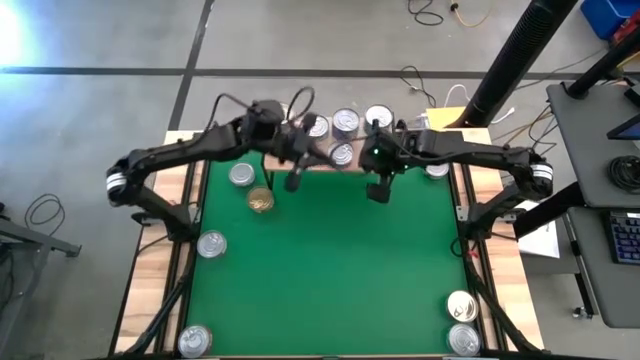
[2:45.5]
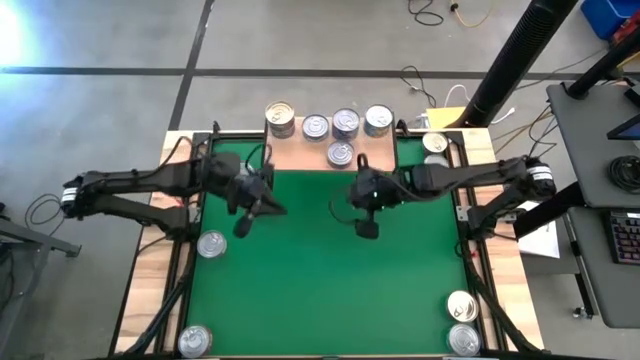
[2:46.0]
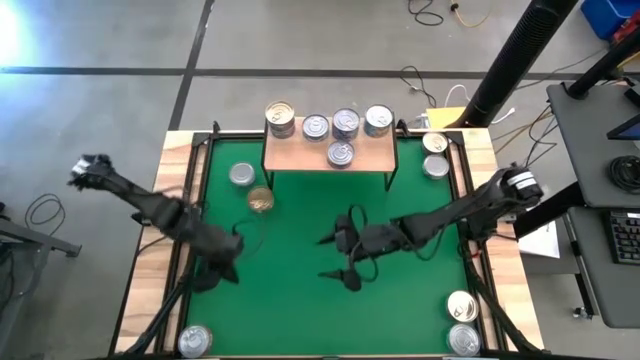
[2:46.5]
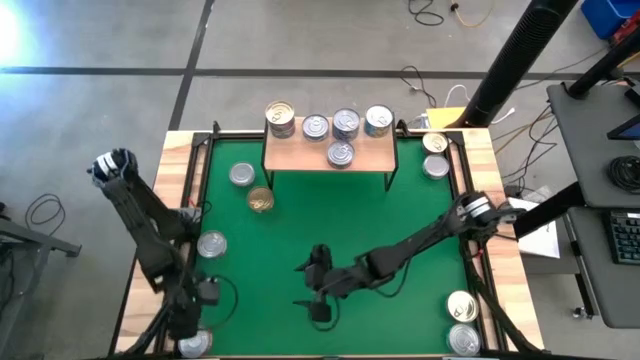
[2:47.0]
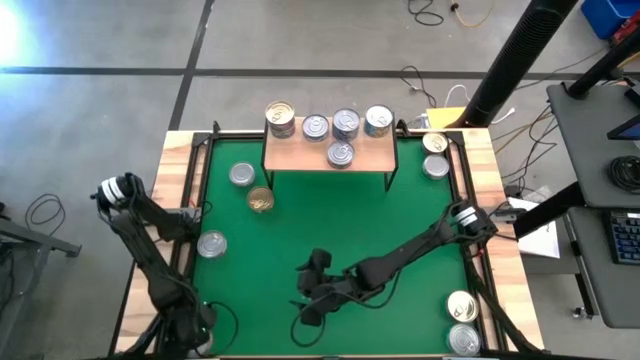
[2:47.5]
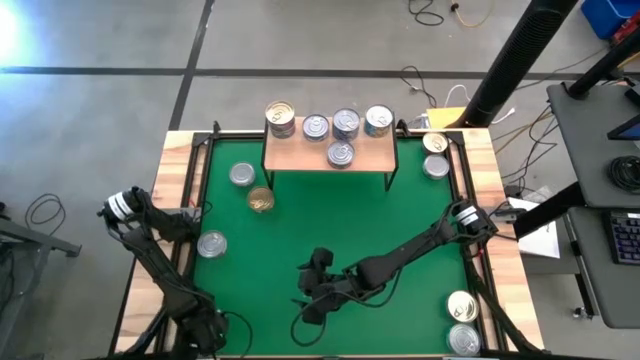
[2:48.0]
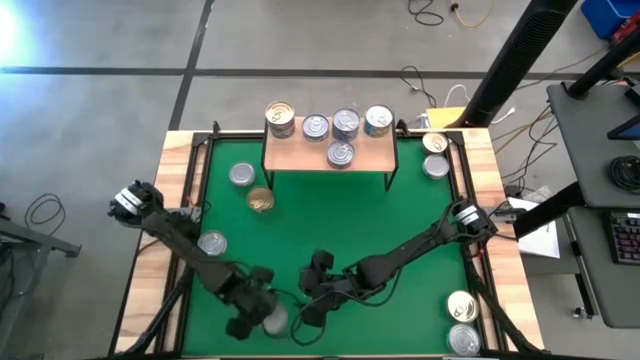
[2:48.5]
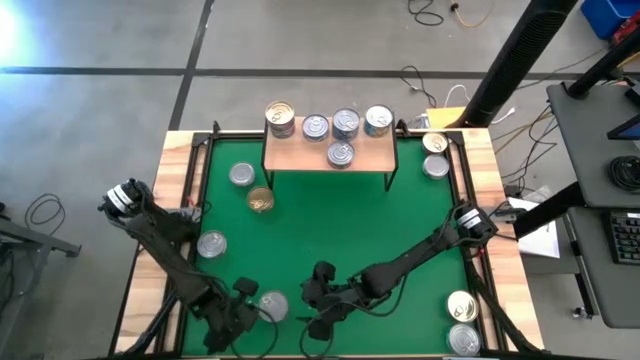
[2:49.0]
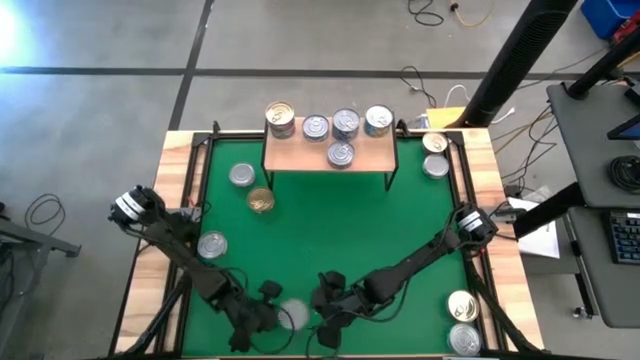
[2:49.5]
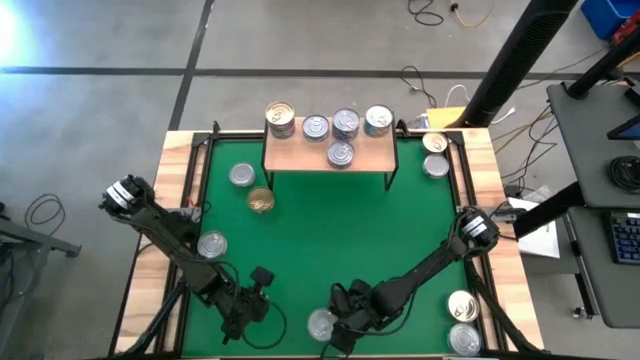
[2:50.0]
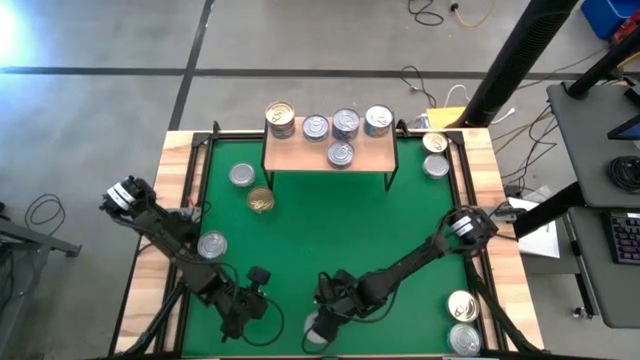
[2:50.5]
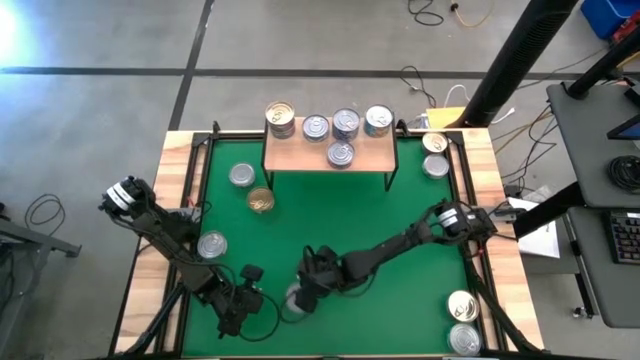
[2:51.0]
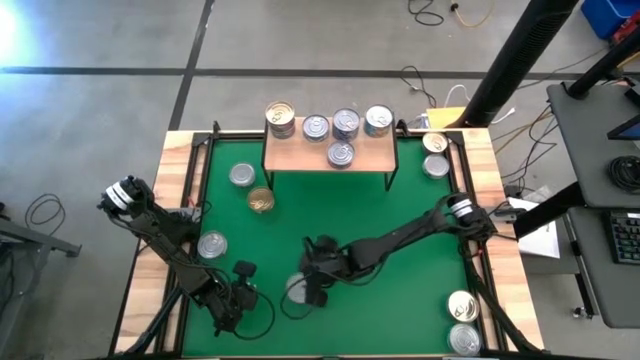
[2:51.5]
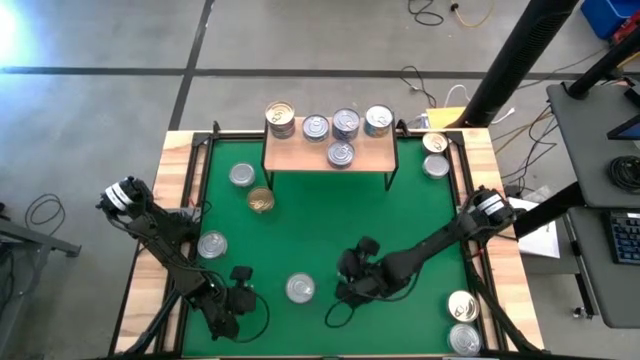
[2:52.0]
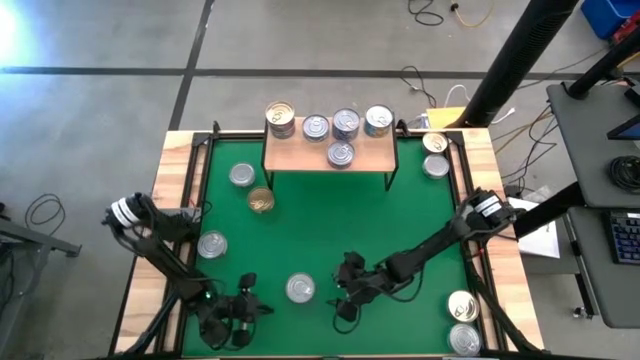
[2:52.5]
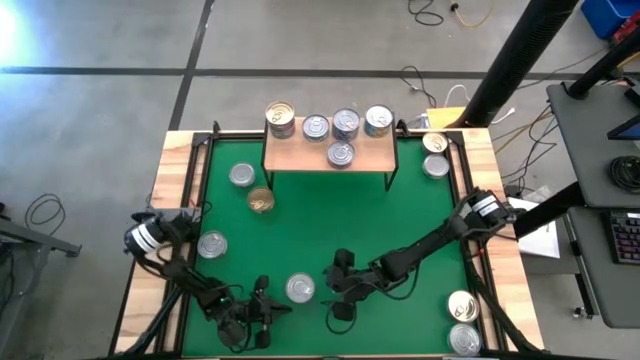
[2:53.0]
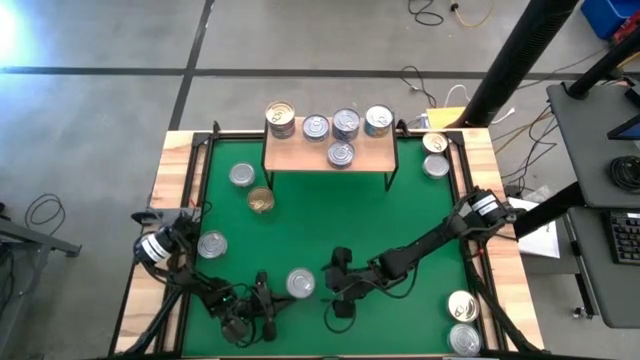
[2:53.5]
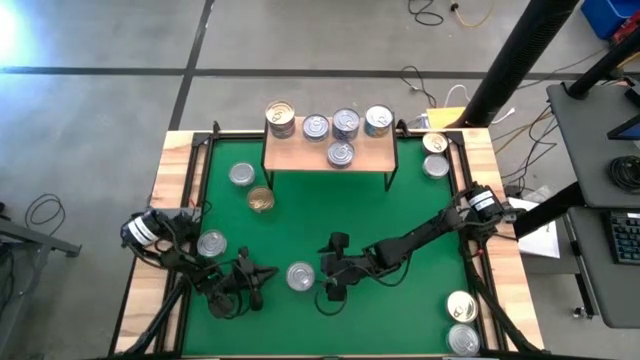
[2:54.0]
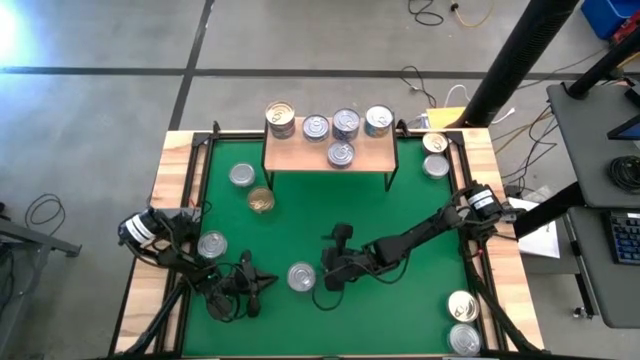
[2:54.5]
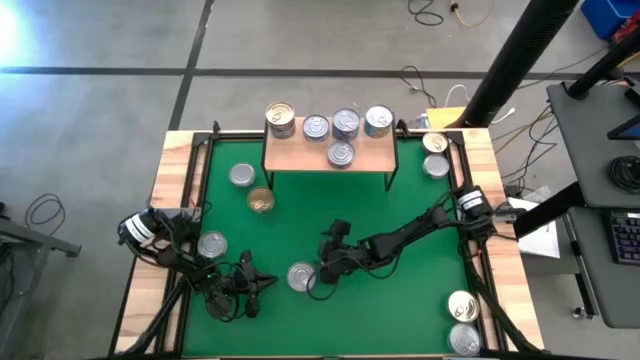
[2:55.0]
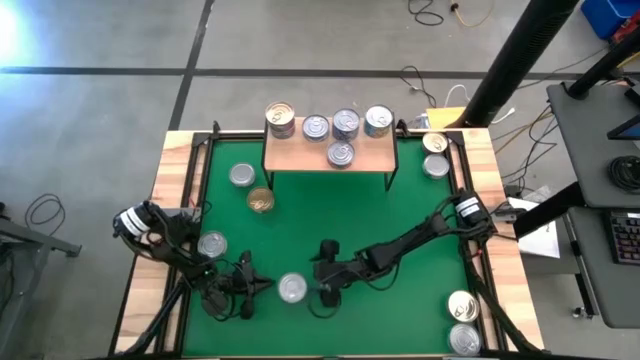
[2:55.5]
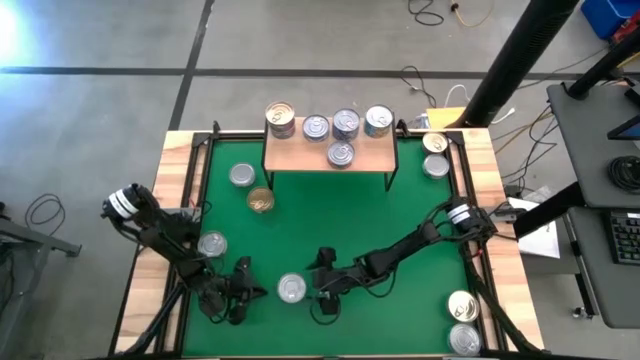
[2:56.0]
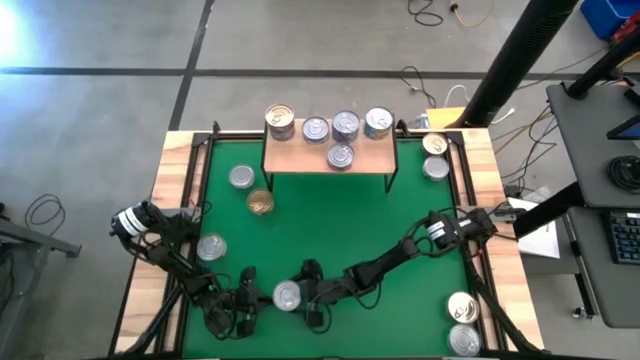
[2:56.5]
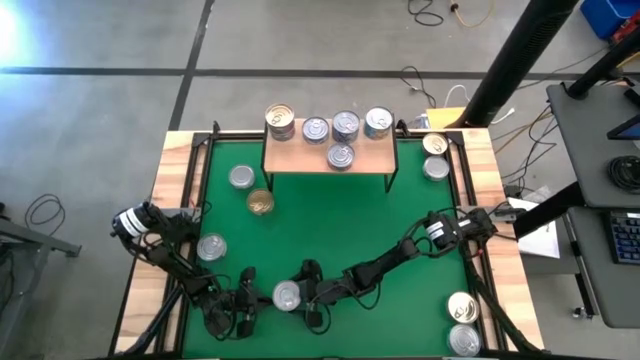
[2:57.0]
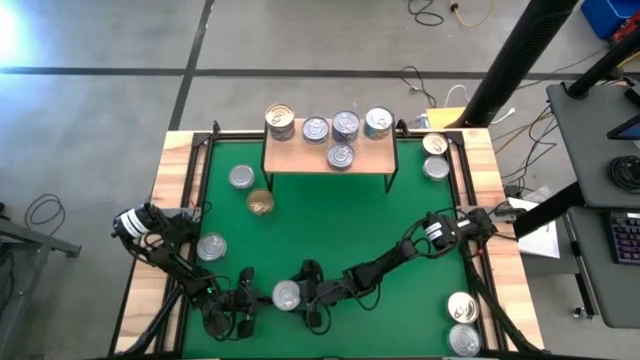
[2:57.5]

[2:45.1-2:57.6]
Task: Stack canned seafood by type on shelf
Stack the red tuna can on top of the red tuna can on the shelf

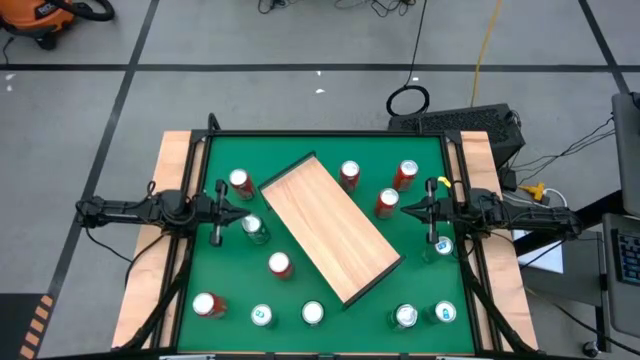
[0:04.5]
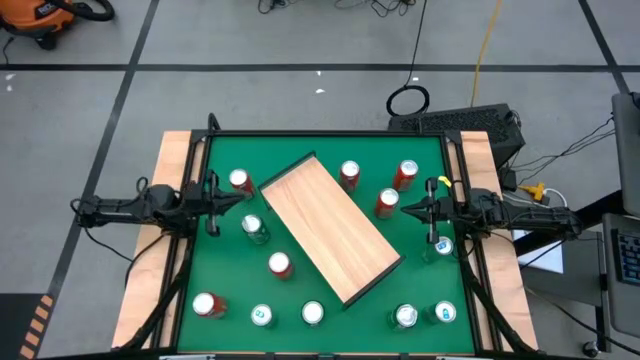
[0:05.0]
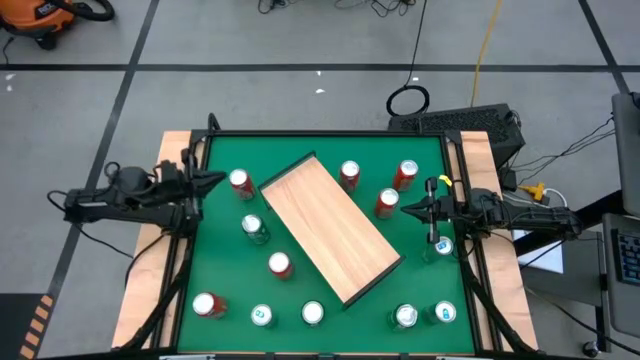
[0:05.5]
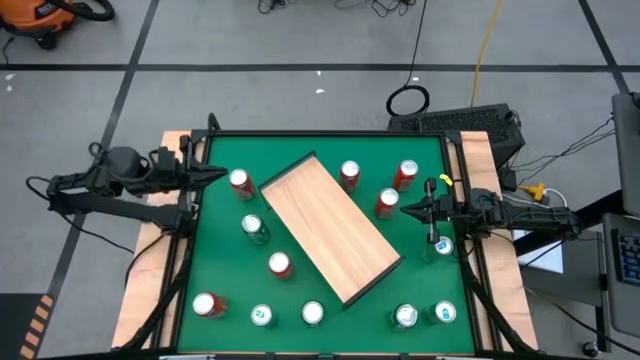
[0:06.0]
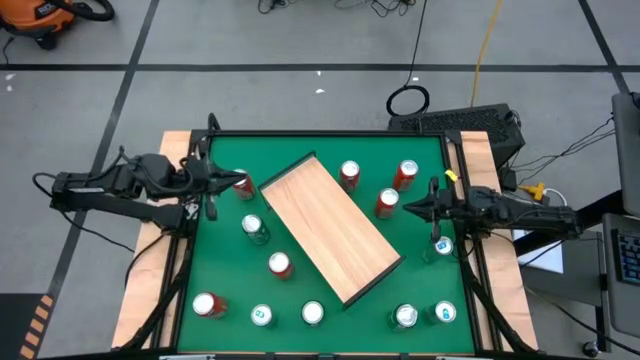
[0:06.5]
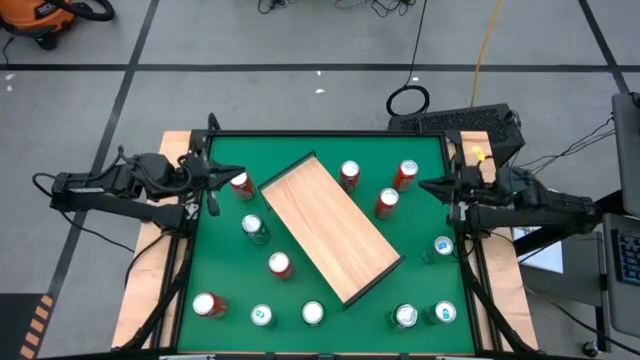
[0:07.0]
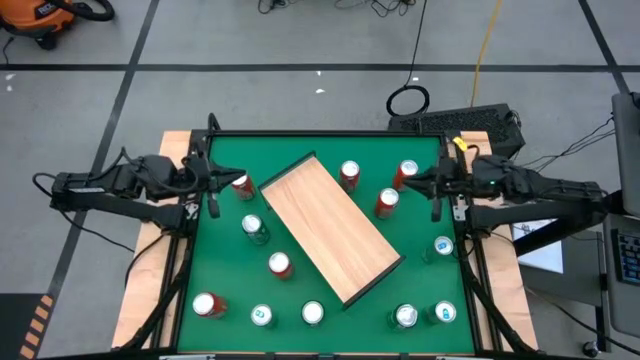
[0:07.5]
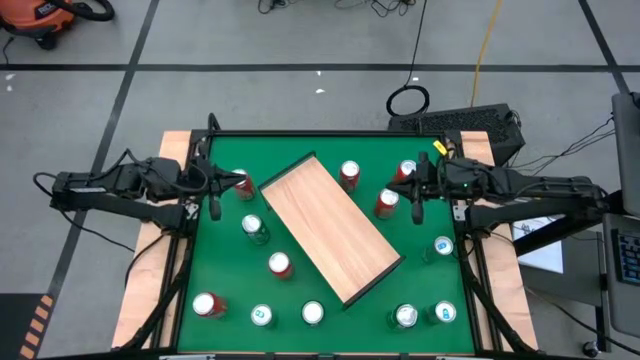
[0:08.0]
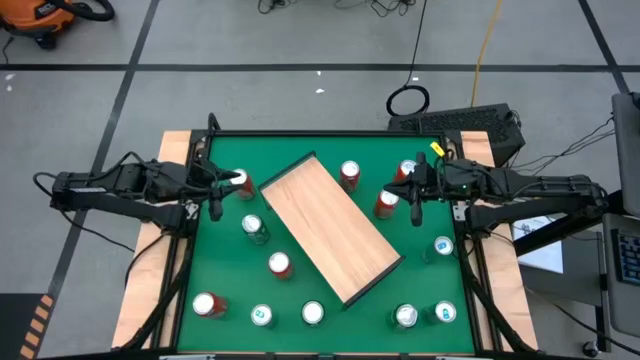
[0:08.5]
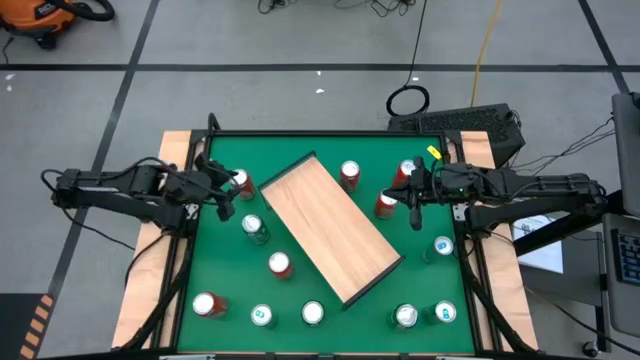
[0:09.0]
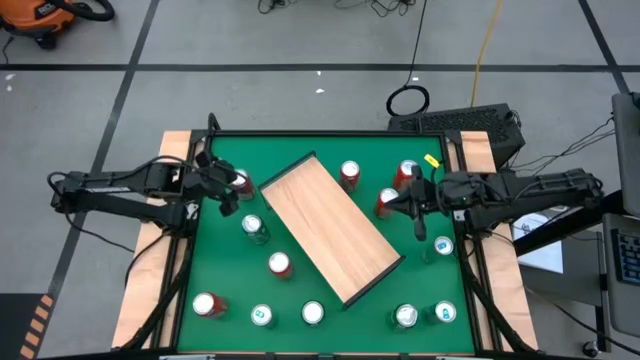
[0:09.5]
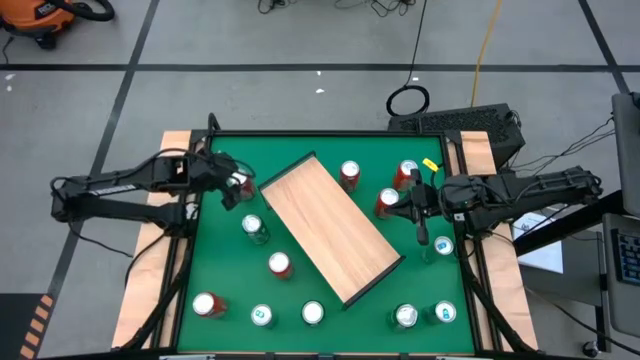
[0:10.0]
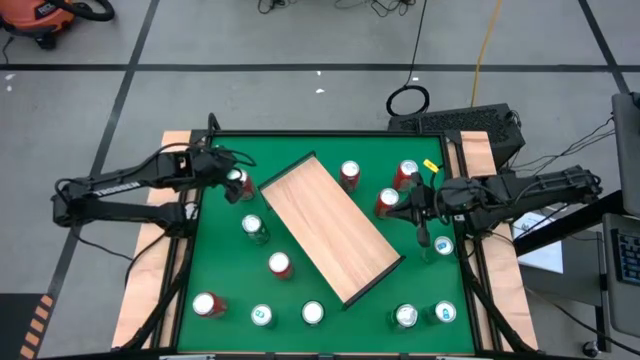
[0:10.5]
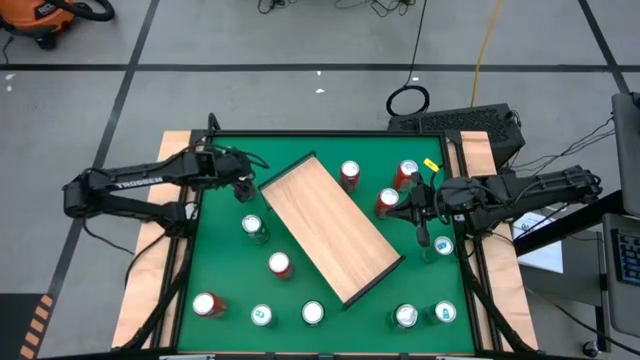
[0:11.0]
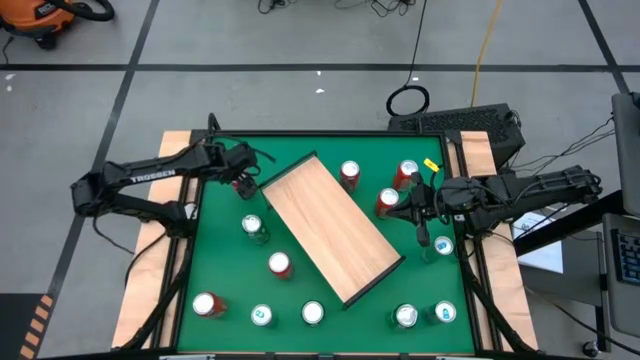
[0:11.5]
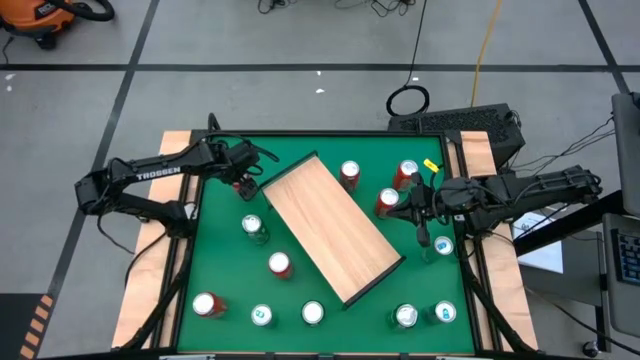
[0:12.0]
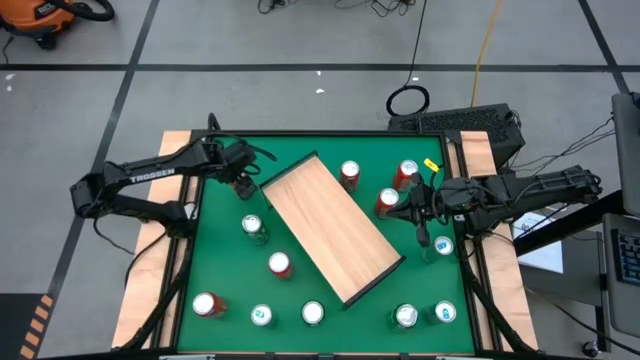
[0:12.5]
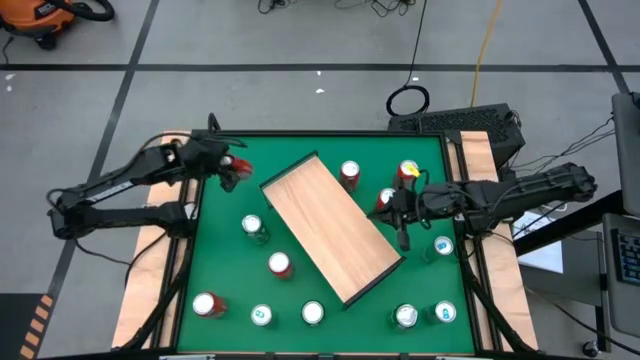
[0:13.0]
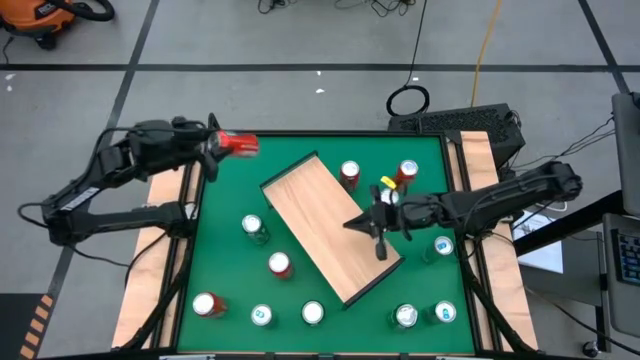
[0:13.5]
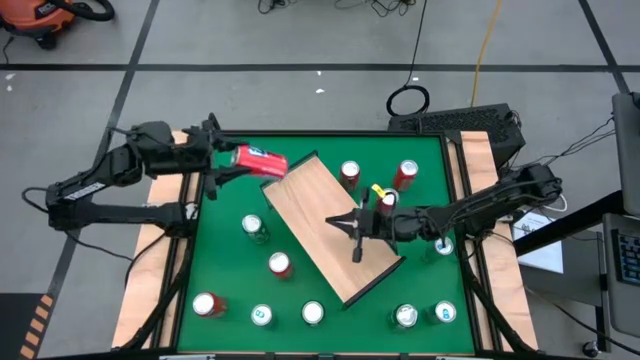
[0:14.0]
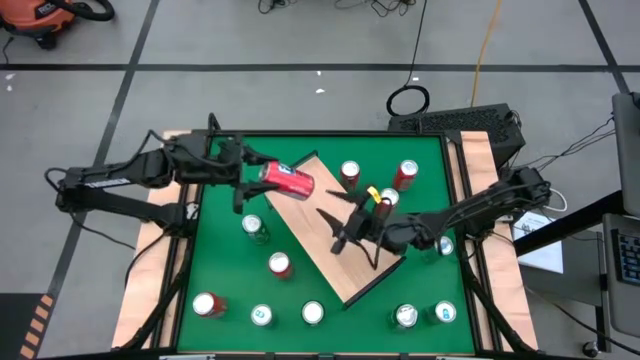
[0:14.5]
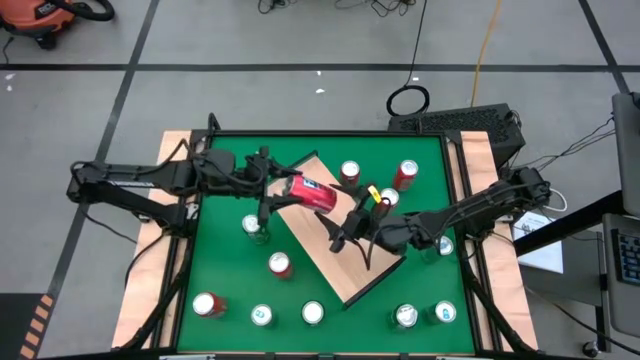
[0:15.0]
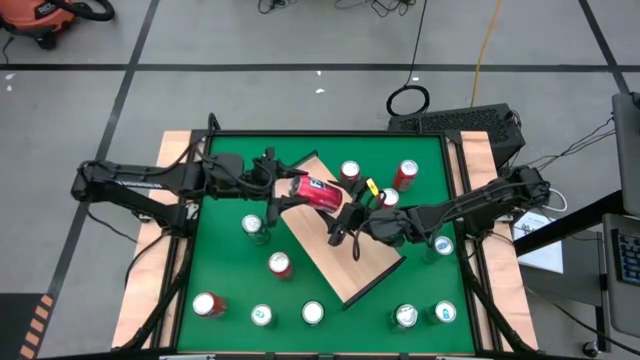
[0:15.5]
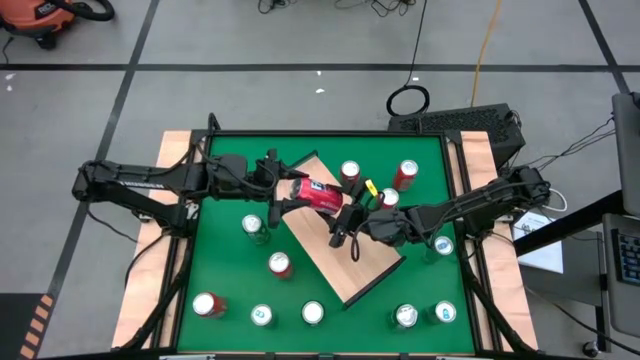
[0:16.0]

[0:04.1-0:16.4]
Task: Place canned beverage on shelf
Put the red soda can on the shelf
